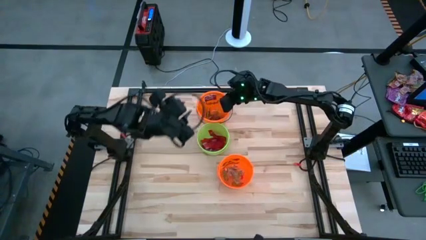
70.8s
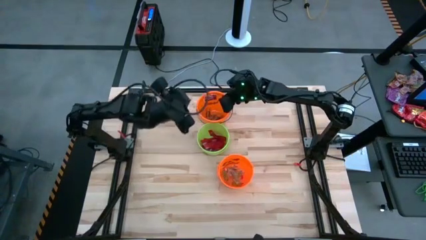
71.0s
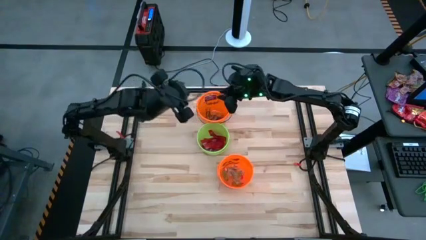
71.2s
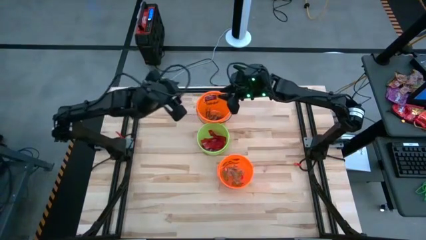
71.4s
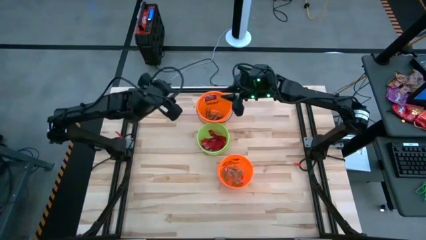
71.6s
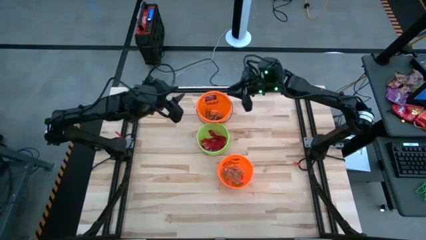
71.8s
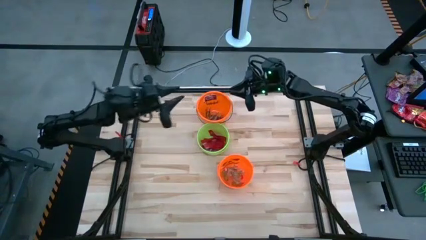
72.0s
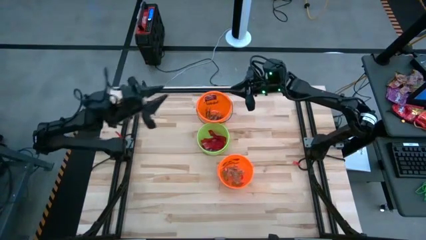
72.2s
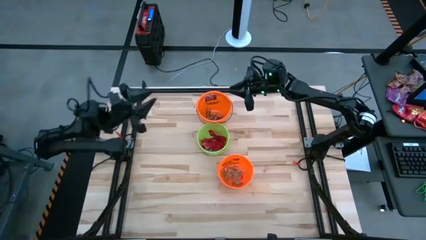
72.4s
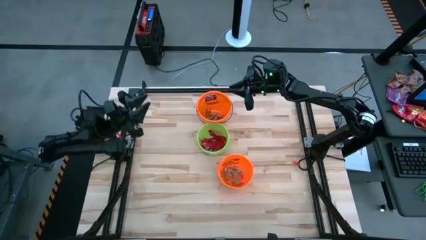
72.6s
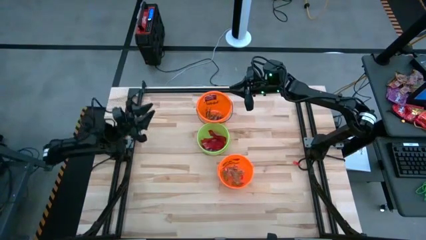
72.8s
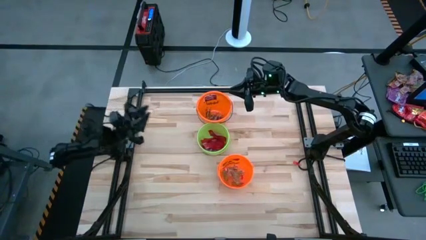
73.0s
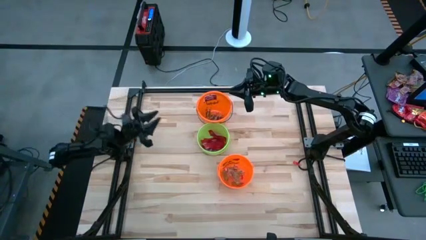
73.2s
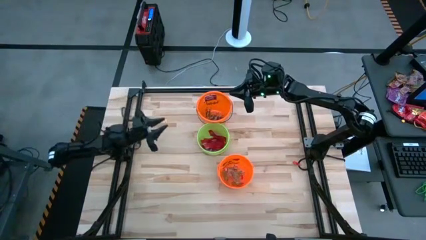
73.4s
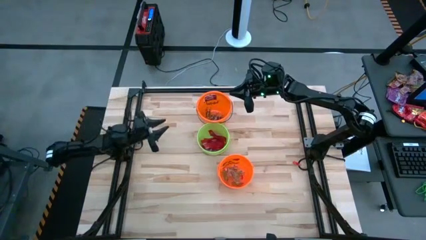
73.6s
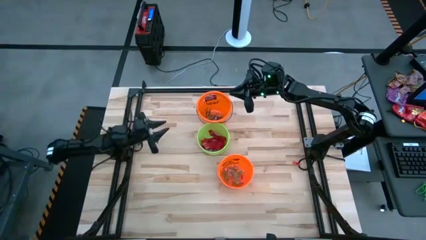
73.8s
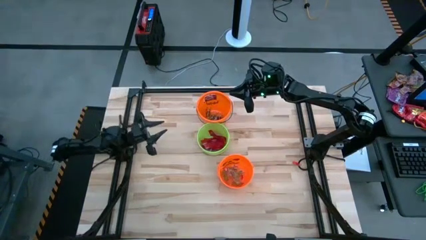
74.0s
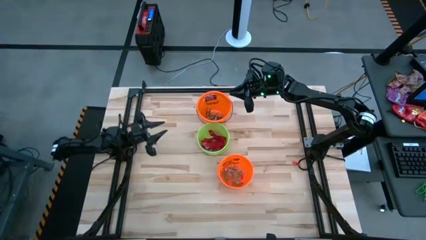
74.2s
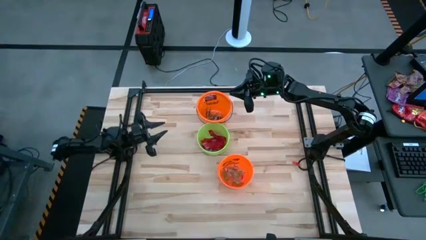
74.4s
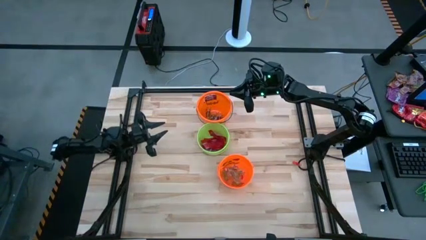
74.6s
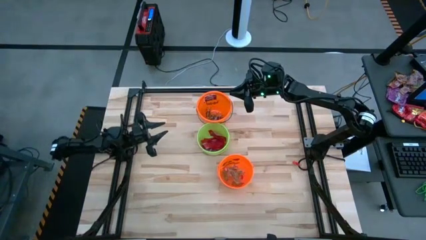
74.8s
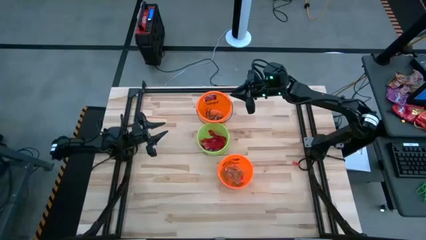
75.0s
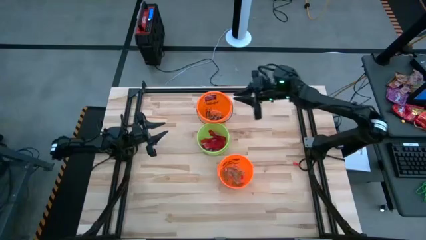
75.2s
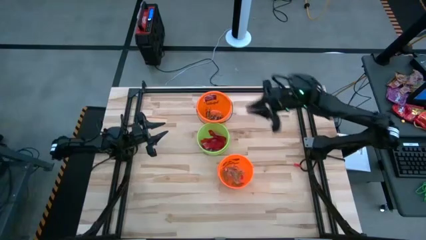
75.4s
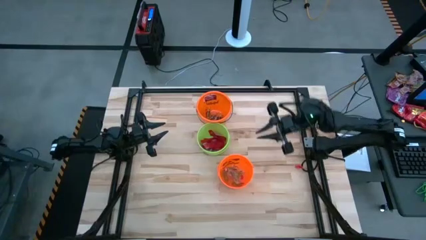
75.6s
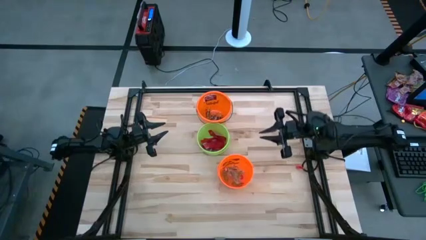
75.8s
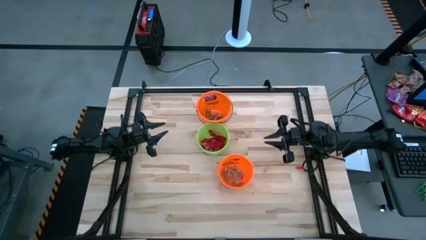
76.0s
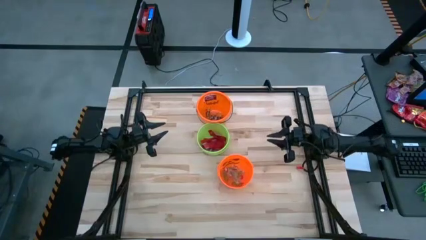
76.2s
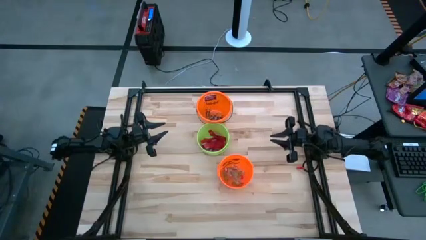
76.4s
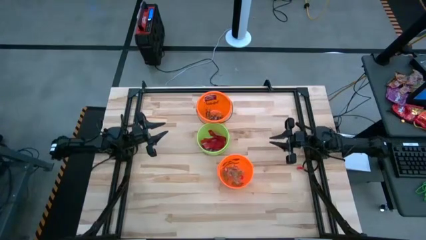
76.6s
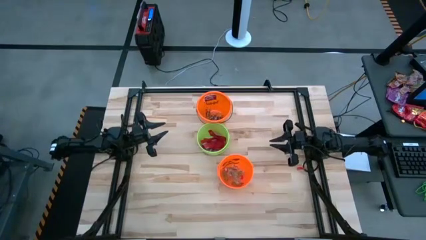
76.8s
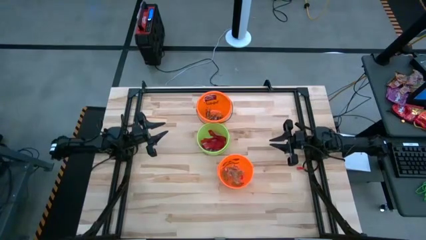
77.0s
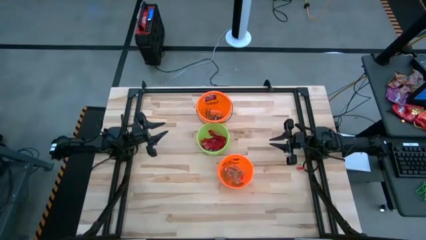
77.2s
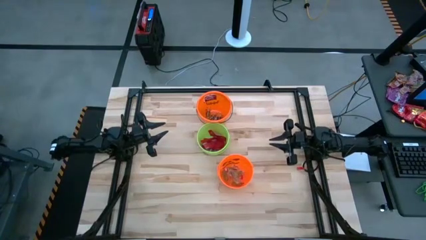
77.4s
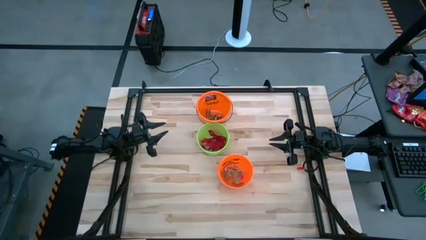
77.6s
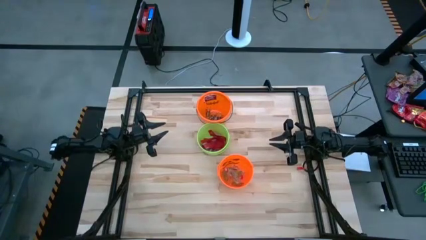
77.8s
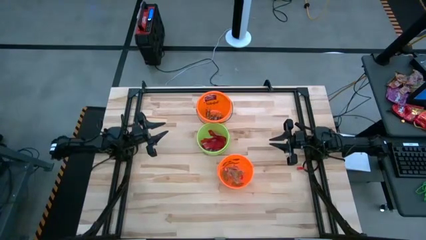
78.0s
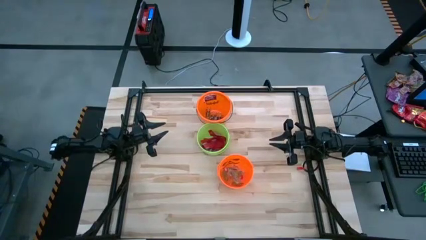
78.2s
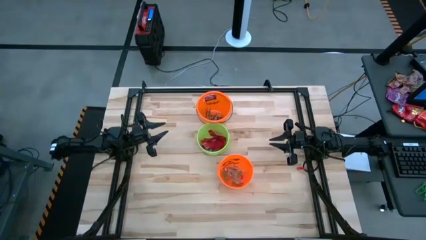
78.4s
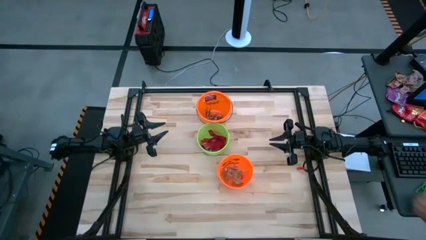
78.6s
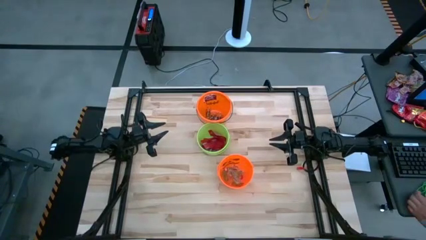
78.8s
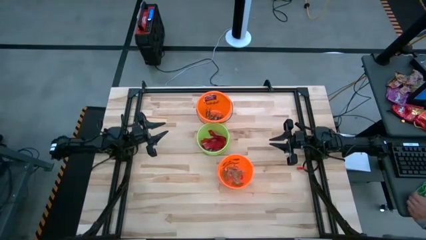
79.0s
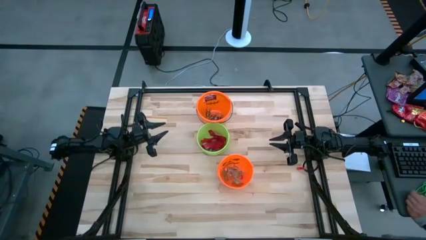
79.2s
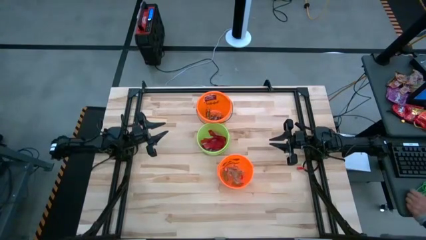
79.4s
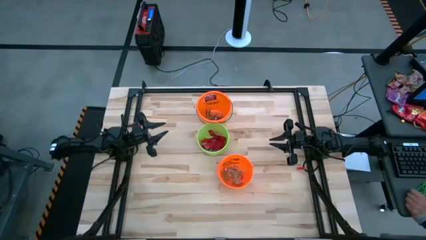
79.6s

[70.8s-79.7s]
Task: Sort candy by brand, put in halloween buckets
Return to Home Position

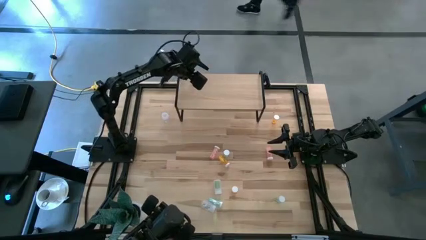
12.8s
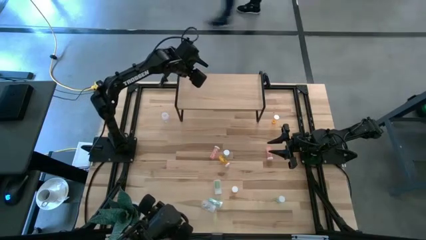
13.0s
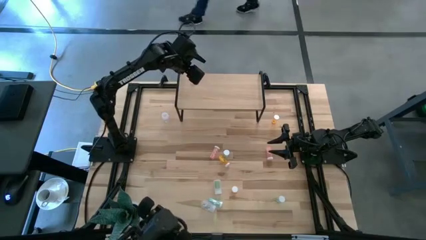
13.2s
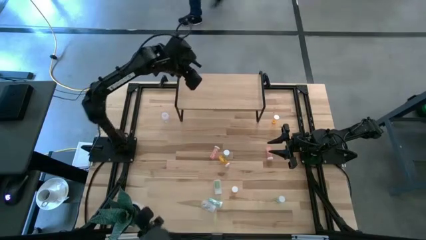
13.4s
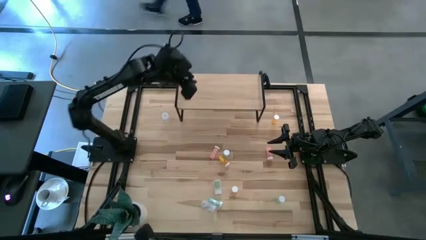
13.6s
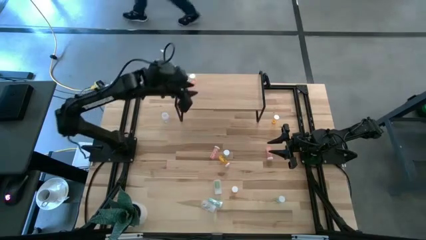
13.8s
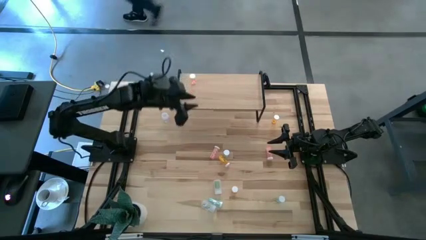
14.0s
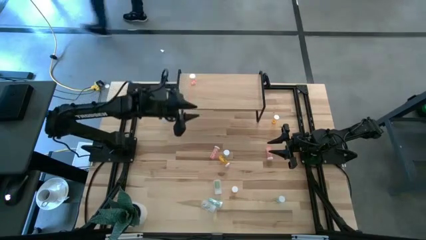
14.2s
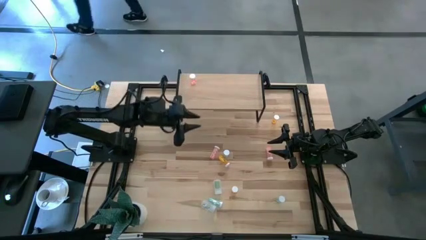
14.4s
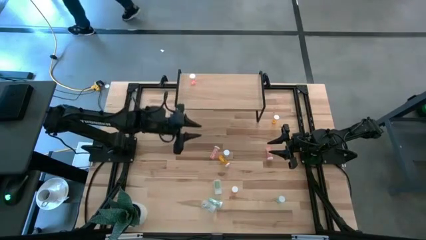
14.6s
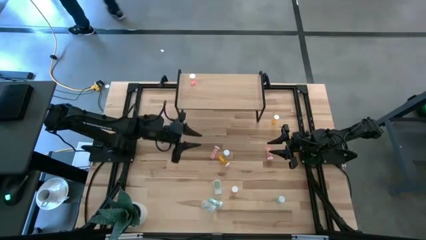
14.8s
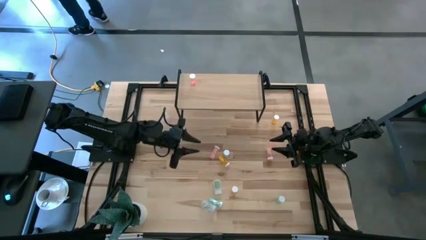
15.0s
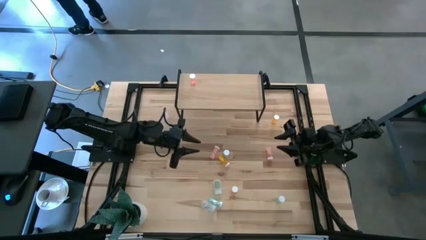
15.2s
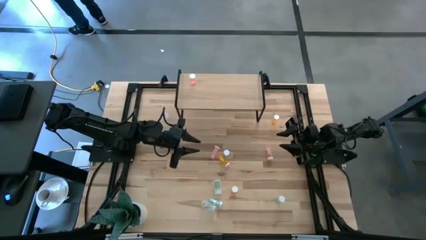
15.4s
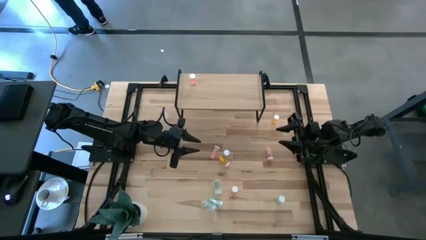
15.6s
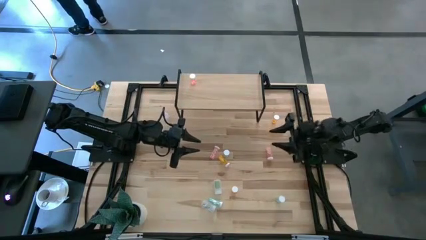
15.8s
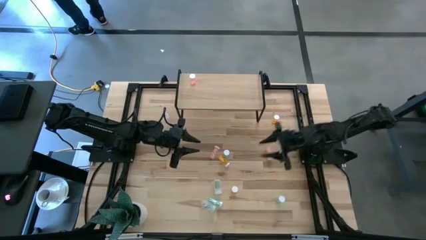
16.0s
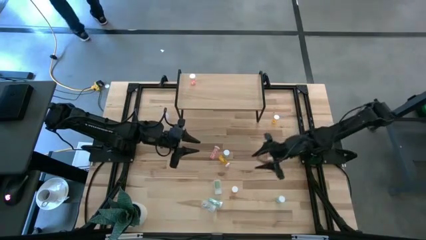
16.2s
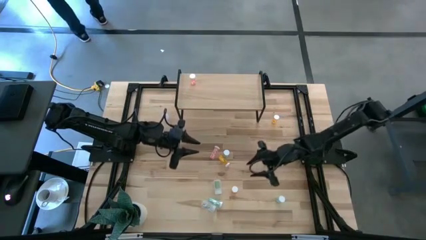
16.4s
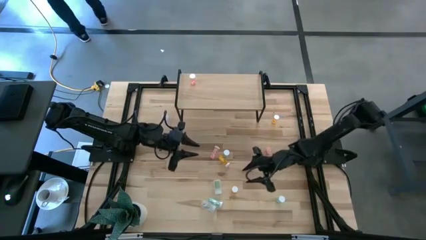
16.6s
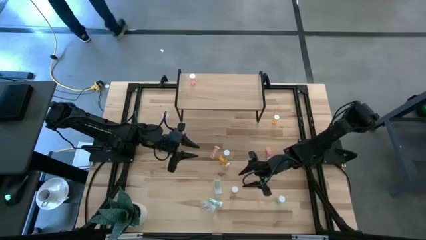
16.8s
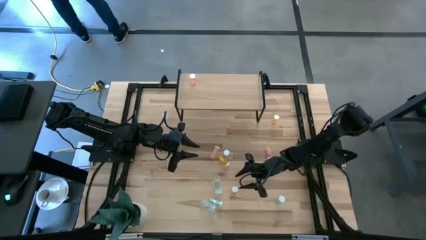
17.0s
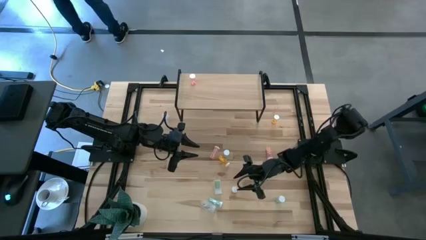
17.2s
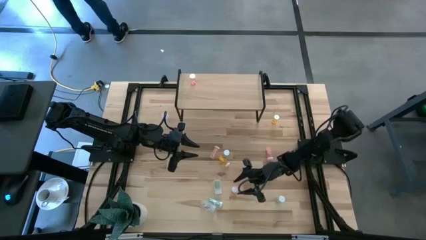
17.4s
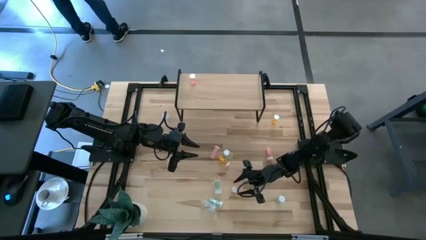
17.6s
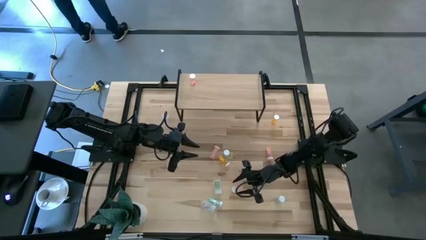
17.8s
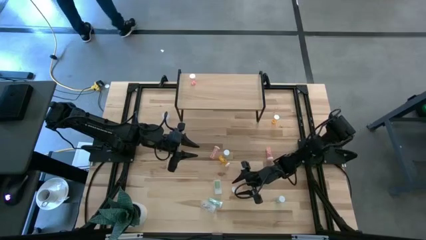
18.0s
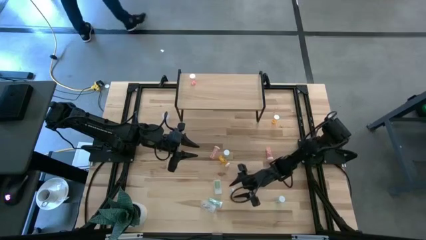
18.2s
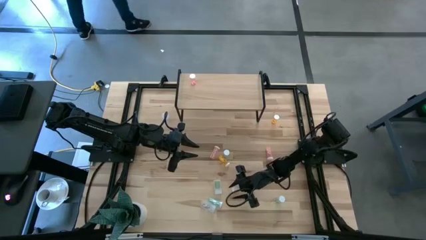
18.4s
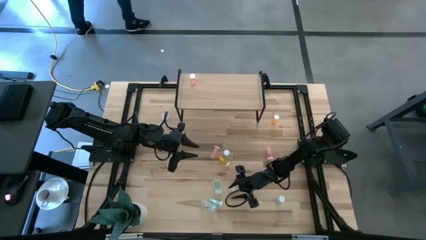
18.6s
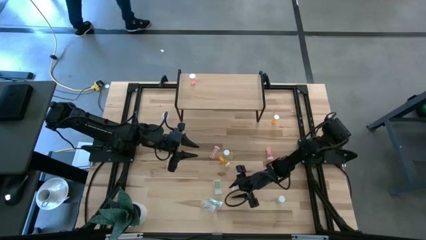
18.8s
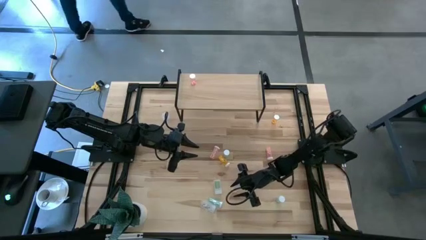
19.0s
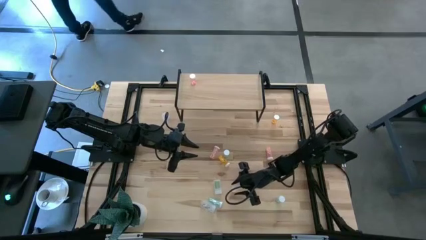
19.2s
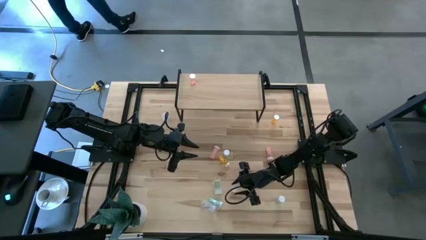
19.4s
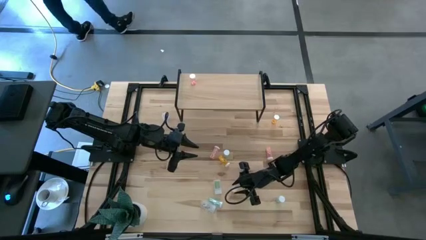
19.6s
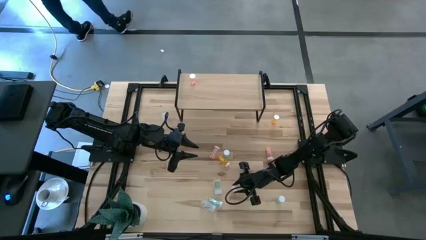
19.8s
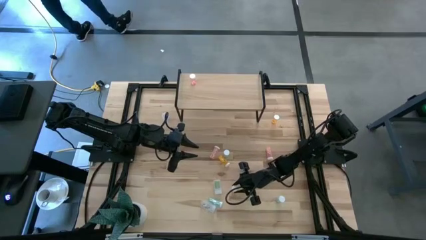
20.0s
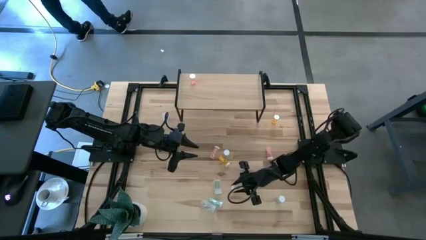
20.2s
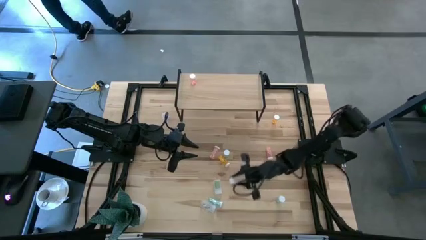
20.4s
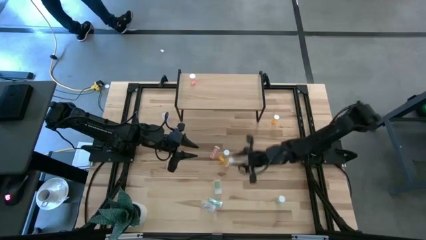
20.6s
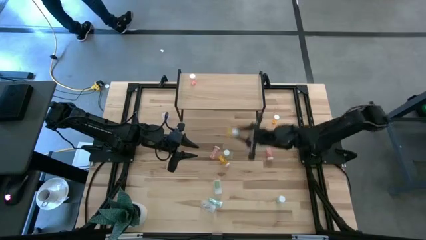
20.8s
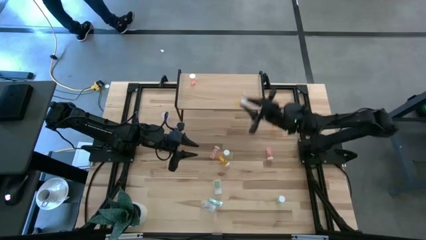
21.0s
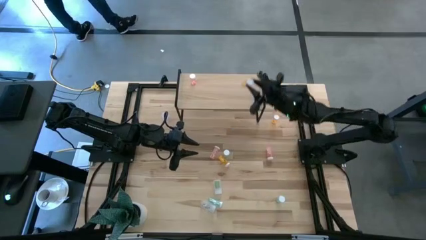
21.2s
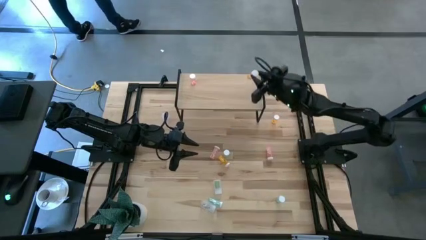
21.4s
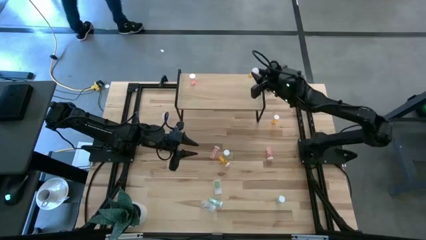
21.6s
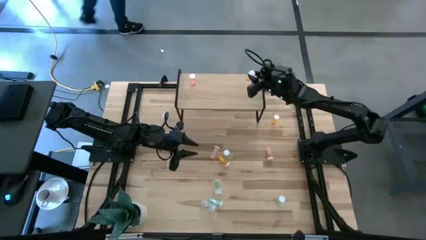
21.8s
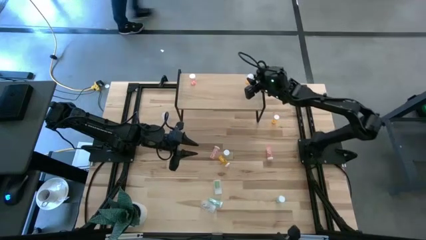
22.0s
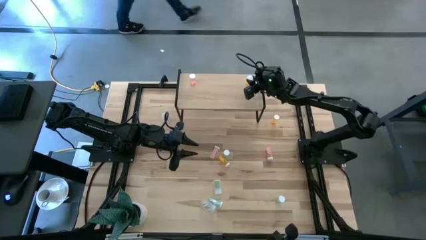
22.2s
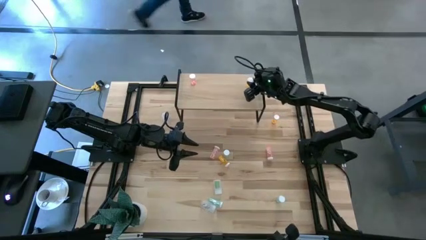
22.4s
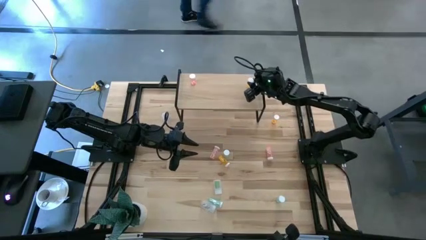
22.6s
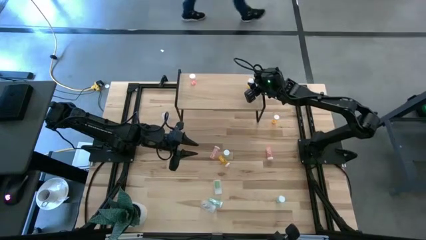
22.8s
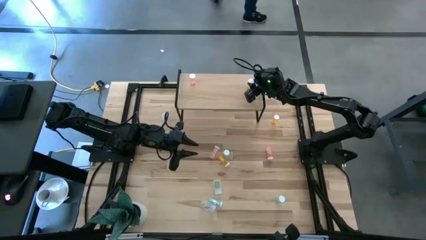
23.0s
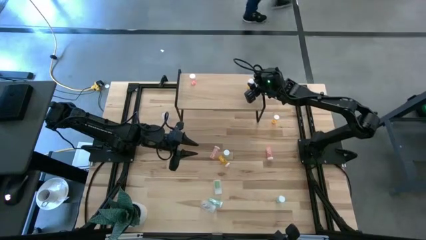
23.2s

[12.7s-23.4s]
Task: Pick and place medicine bottles onto shelf by color
Put the bottom orange pill bottle on the shelf
